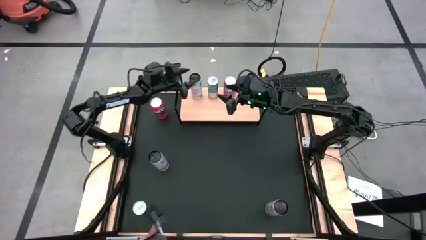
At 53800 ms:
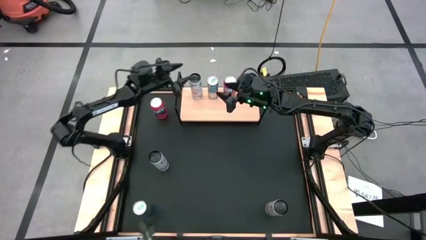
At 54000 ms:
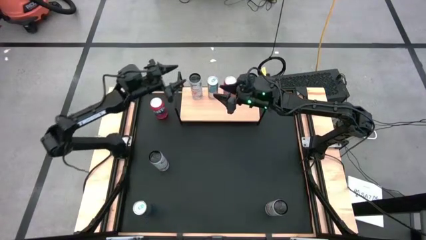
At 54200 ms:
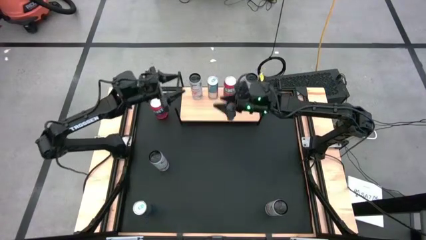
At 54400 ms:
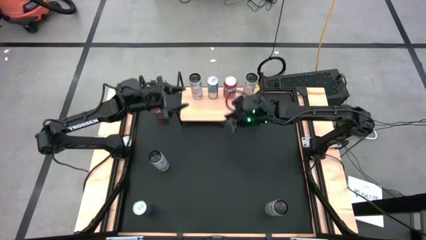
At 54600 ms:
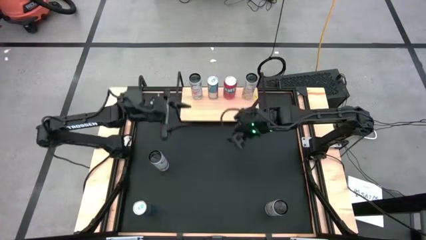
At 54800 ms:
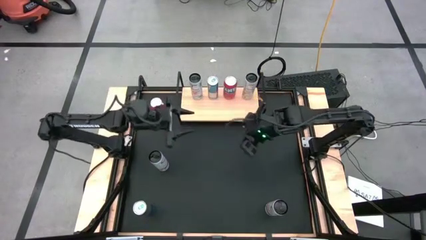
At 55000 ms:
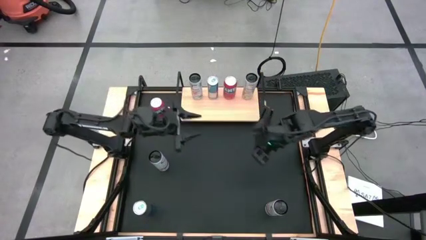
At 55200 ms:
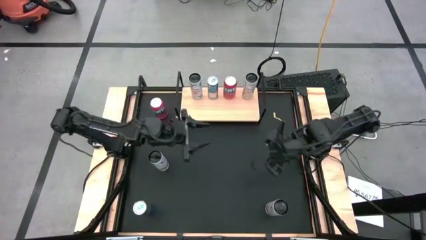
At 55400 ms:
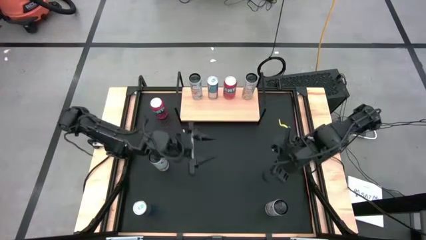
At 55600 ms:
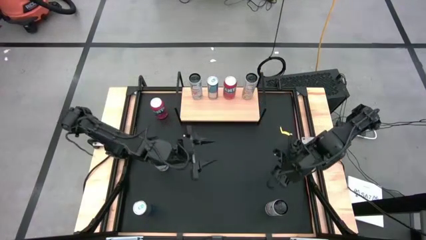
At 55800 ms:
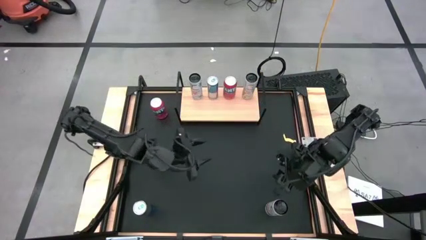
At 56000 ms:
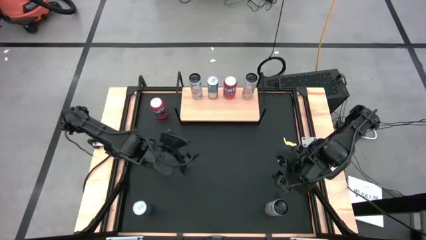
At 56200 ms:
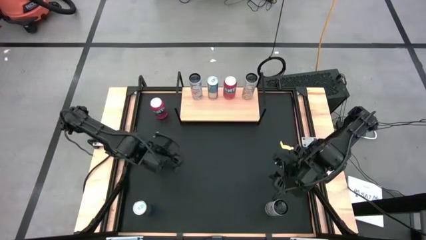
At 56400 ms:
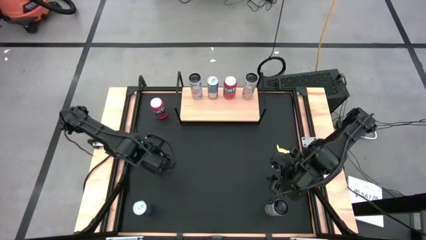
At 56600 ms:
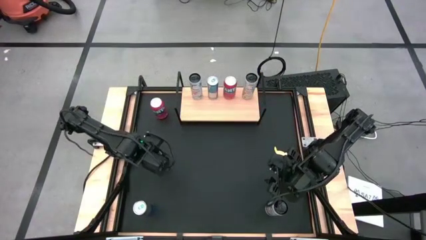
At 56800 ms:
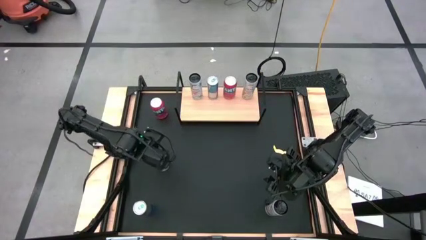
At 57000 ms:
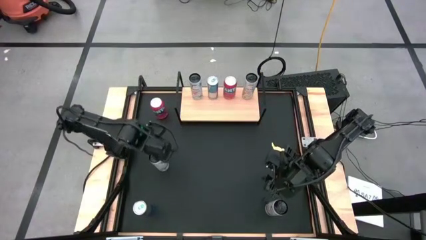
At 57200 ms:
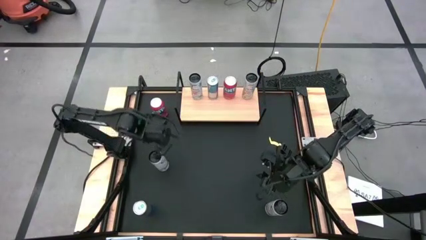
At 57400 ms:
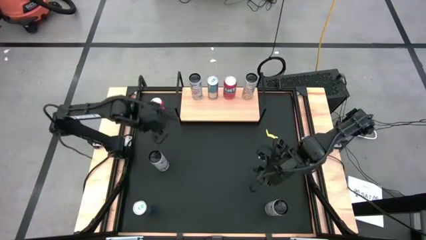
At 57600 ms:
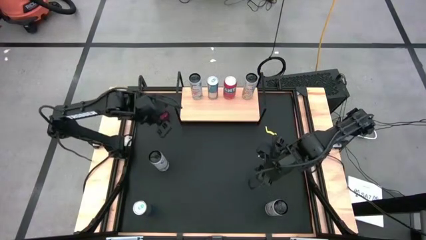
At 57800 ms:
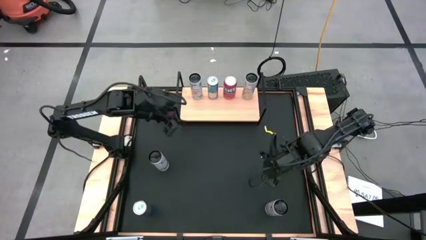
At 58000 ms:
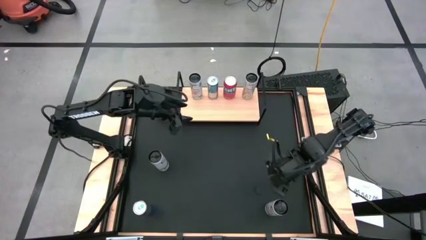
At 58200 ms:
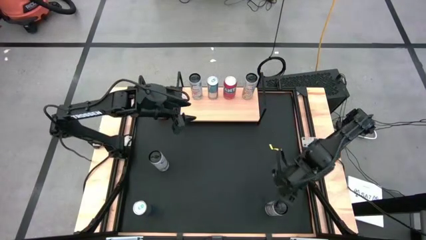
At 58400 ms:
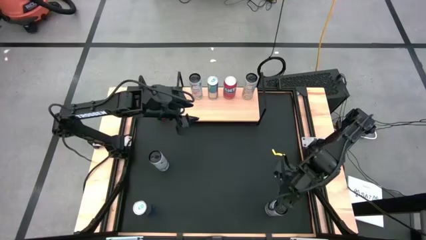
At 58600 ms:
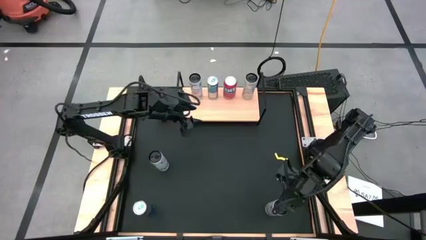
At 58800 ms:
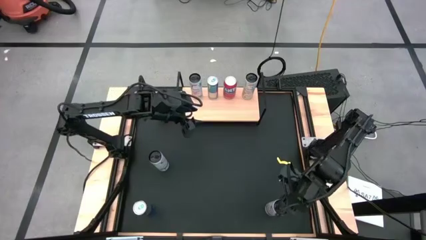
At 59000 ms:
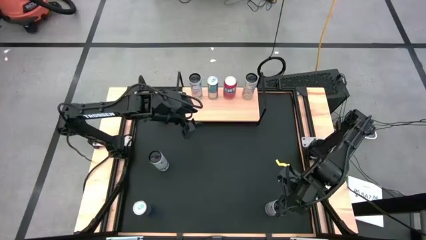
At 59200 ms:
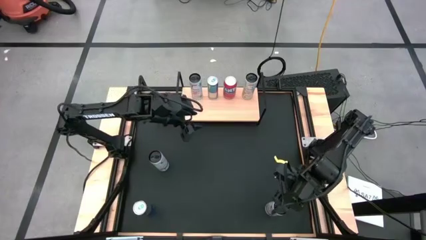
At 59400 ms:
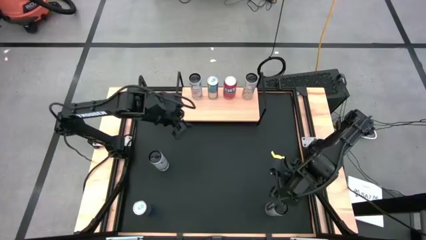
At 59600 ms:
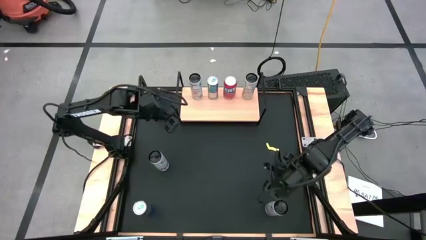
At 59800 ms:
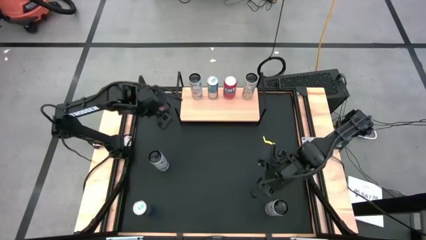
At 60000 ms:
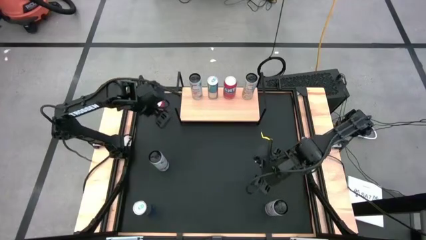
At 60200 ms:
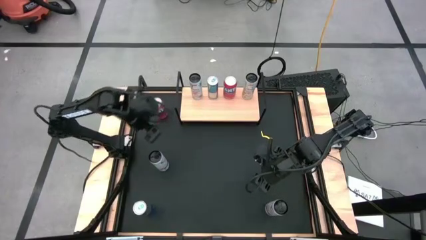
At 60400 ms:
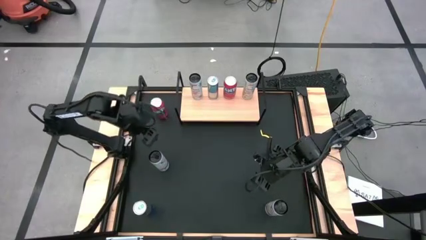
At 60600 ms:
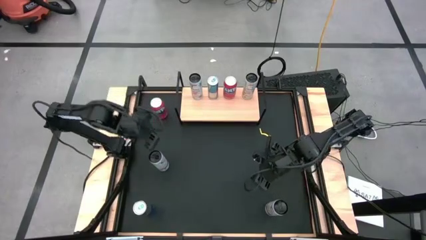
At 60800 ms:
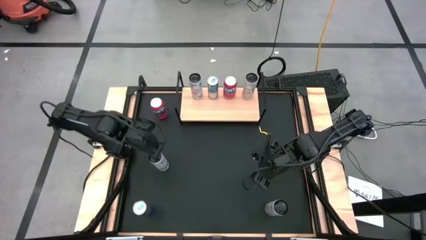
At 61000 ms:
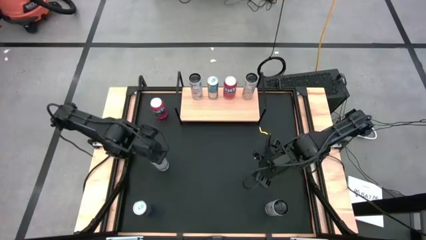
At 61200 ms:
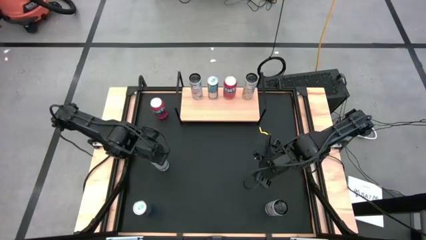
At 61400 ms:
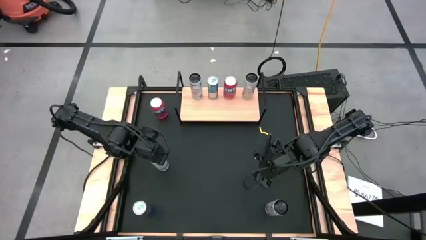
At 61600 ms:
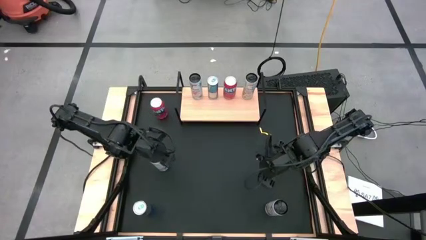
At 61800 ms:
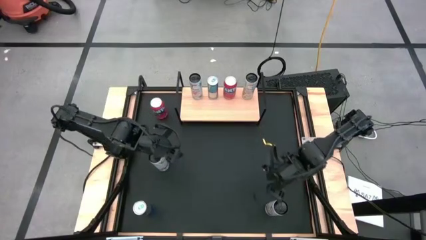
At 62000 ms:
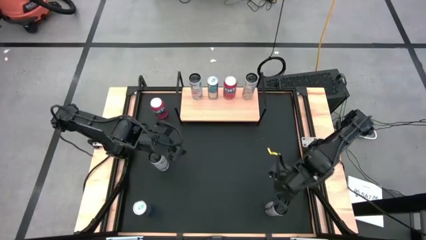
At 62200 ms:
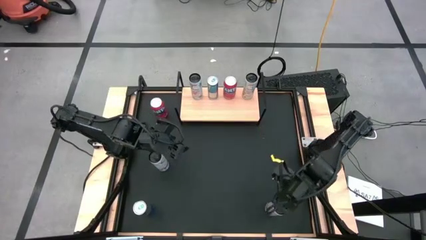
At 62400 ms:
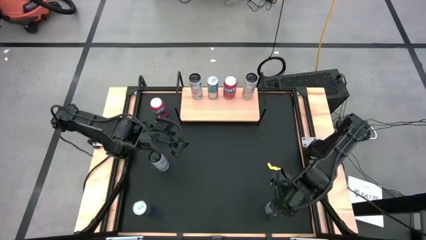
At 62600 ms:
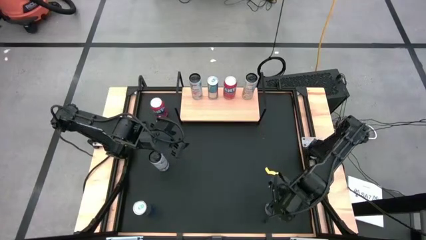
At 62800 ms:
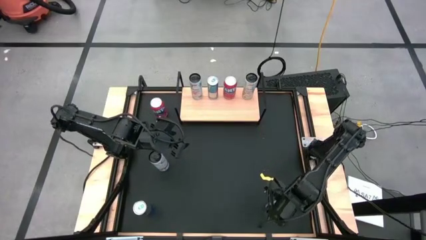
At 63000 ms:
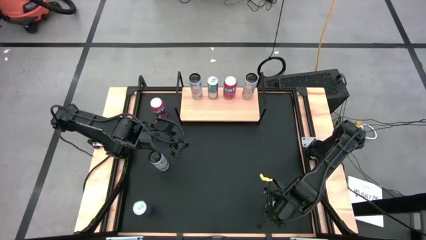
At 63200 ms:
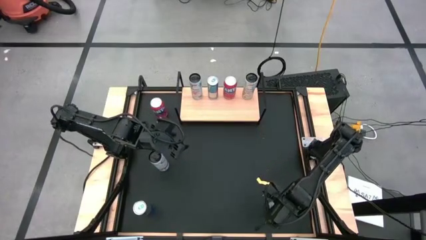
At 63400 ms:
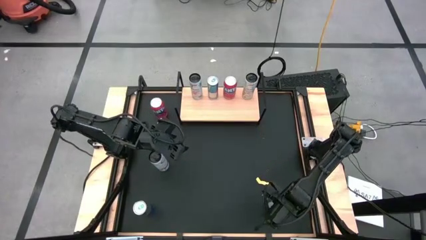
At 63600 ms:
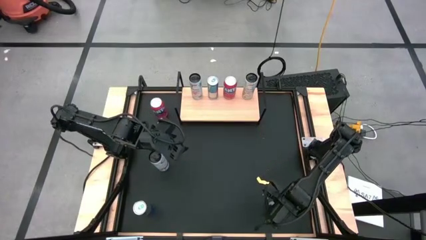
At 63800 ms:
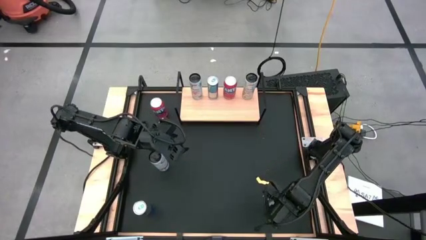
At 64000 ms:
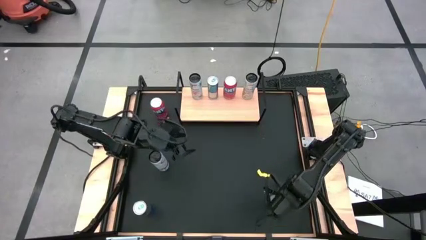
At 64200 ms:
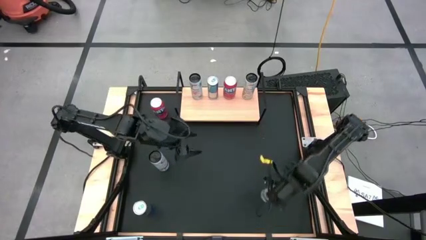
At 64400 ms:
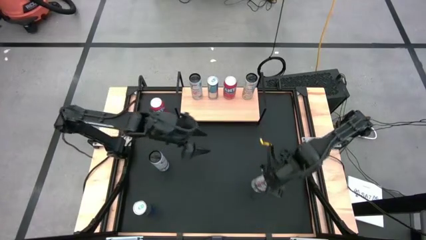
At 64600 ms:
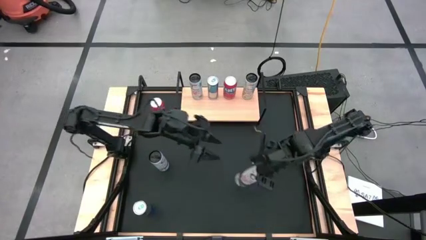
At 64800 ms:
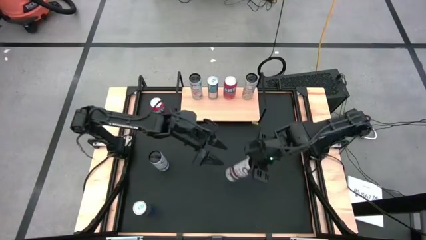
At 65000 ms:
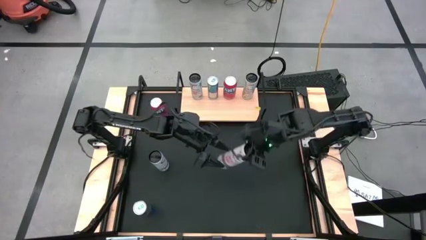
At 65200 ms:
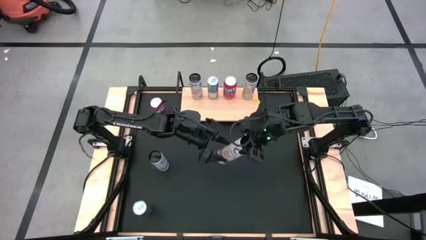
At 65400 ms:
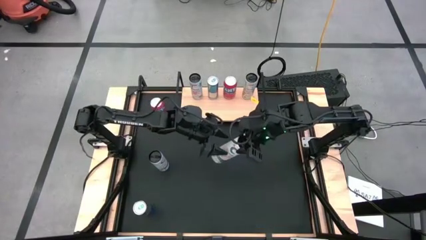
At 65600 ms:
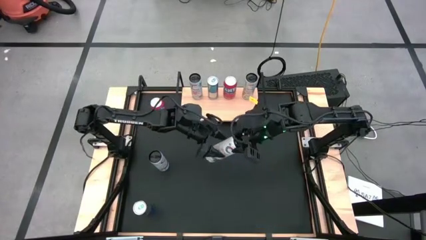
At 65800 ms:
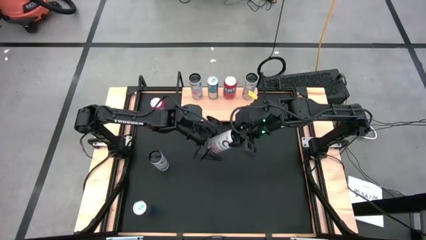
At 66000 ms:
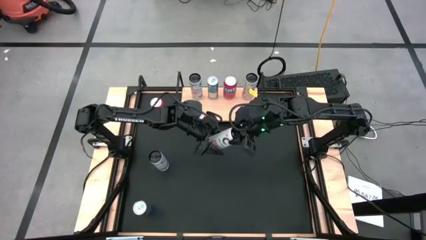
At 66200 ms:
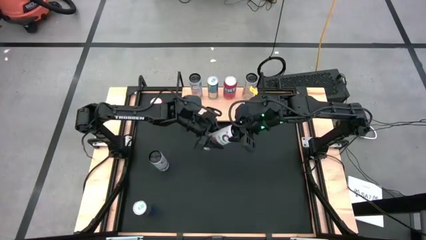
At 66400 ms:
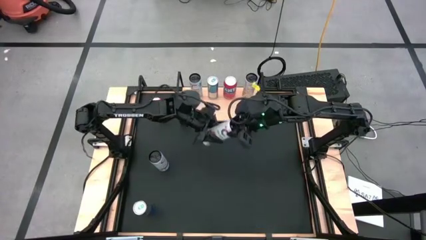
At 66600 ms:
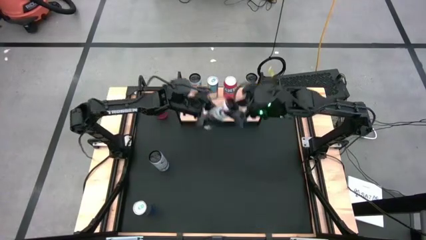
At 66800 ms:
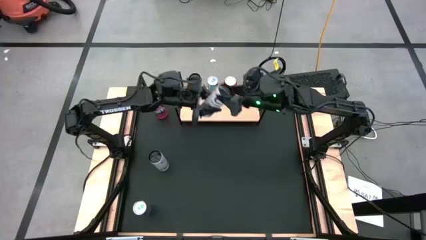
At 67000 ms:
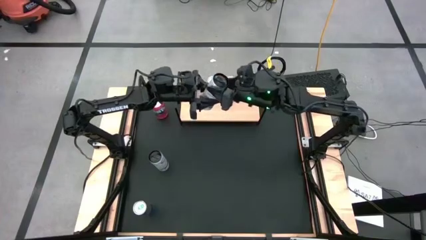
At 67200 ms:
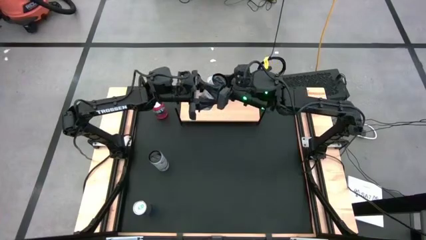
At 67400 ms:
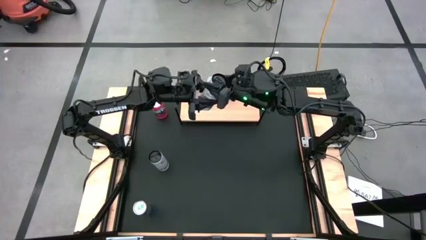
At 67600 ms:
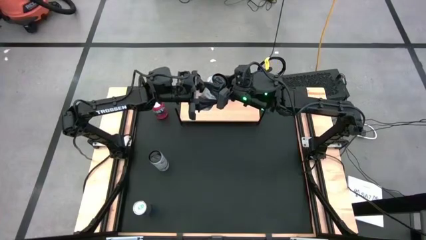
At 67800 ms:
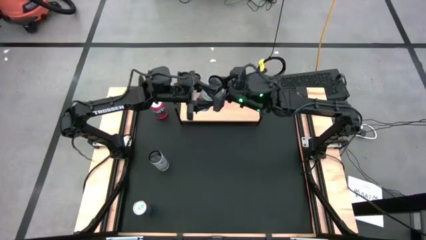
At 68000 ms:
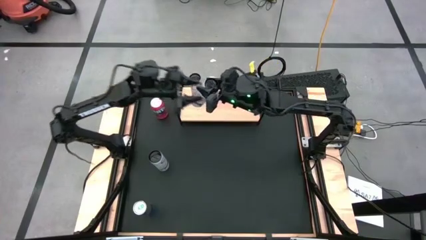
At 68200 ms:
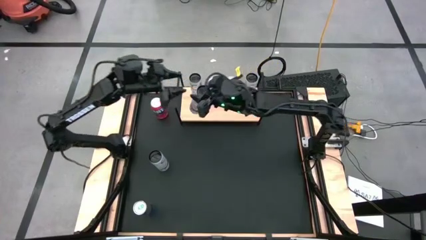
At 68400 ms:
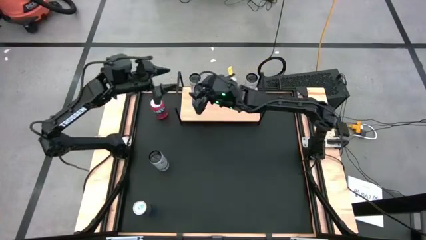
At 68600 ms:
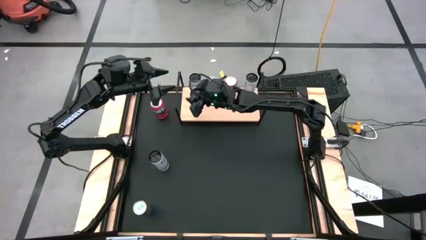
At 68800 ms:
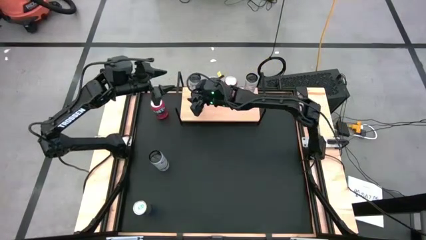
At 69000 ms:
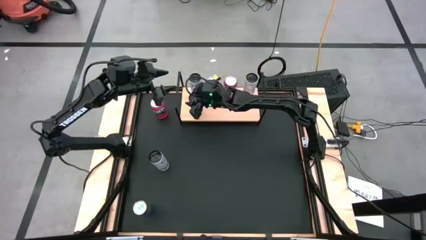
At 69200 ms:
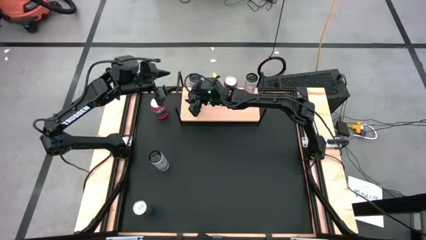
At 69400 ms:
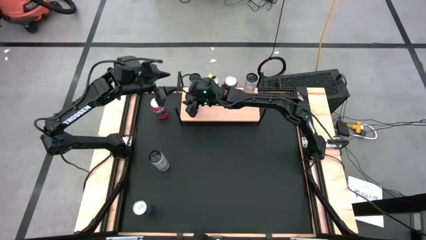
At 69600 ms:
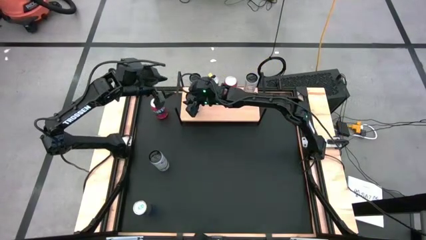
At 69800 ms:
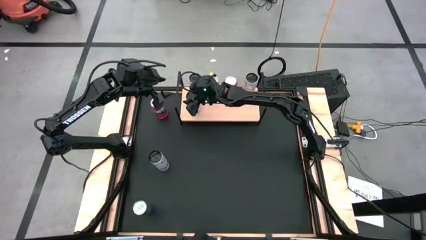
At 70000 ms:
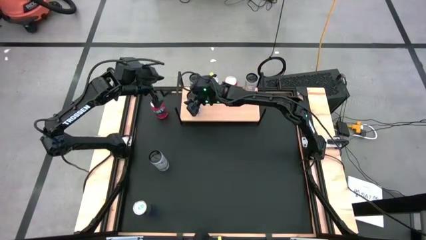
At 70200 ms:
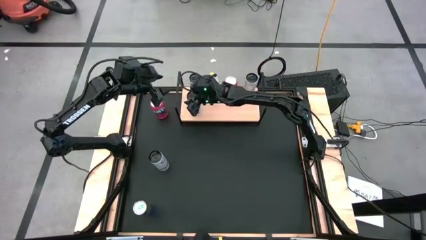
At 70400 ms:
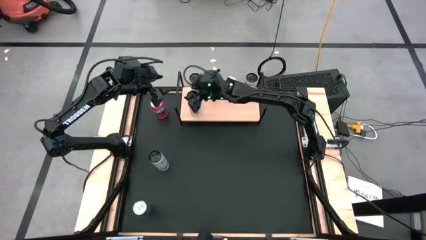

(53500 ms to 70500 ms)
Task: Place canned beverage on shelf
Put the white-pink soda can on the shelf aligned with the other white-pink soda can
